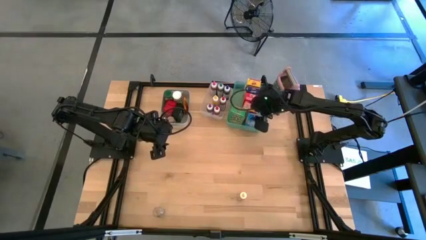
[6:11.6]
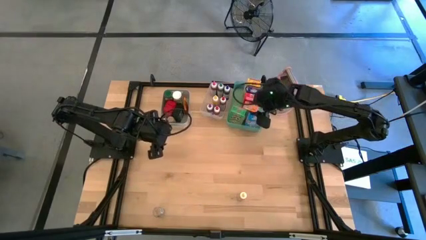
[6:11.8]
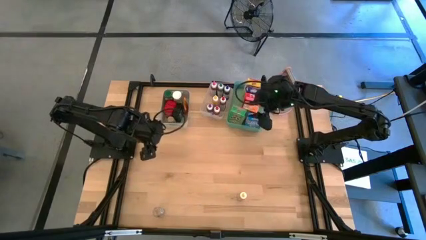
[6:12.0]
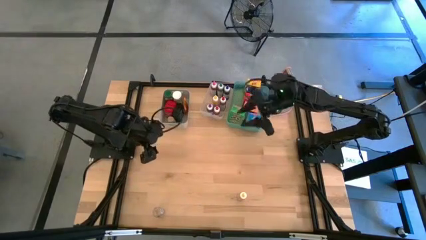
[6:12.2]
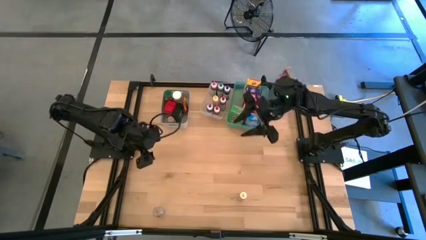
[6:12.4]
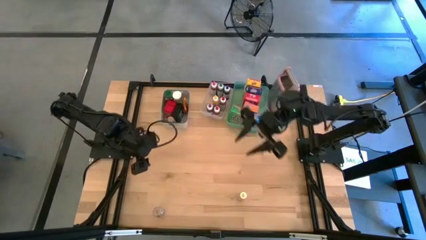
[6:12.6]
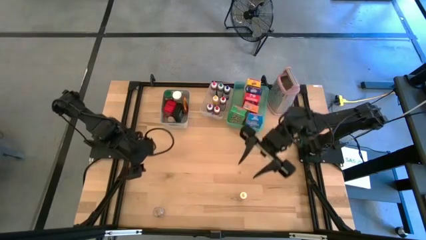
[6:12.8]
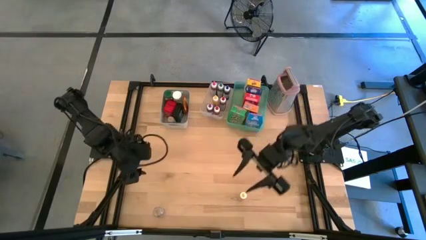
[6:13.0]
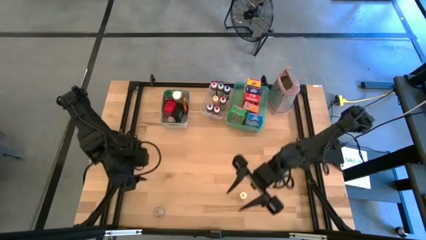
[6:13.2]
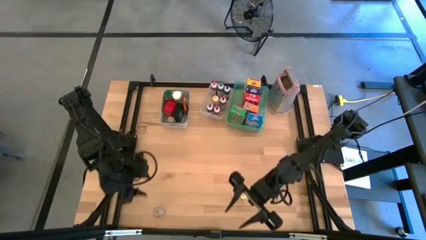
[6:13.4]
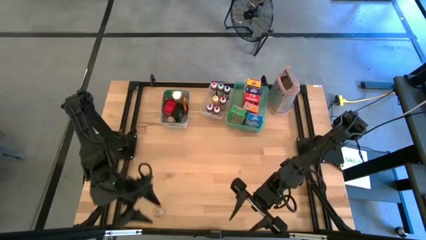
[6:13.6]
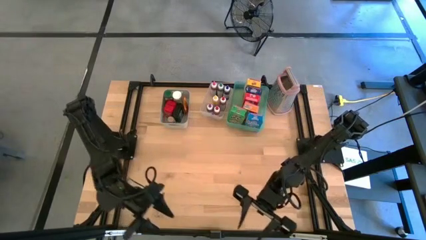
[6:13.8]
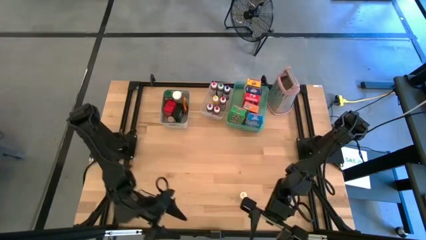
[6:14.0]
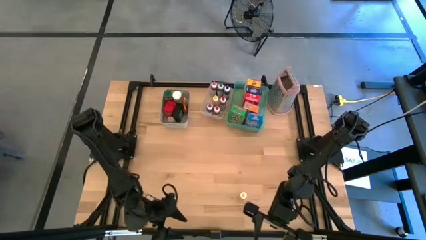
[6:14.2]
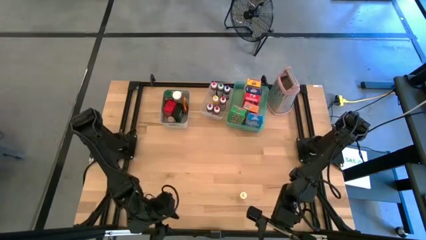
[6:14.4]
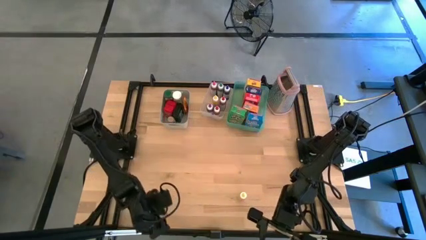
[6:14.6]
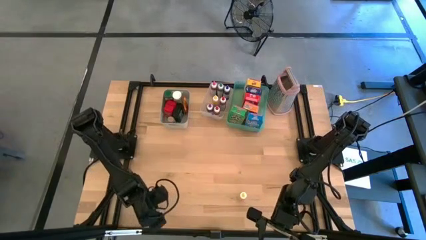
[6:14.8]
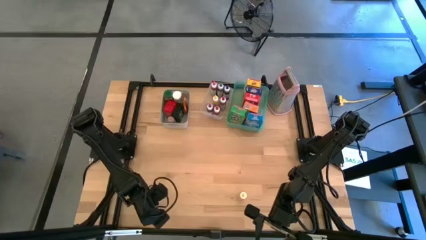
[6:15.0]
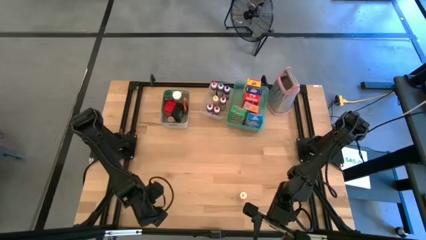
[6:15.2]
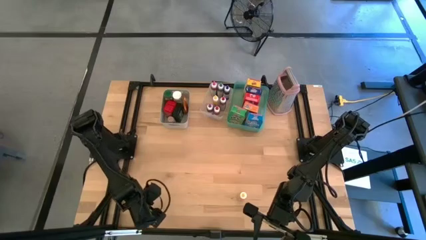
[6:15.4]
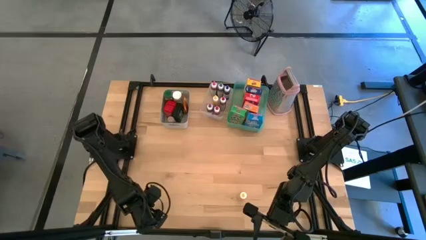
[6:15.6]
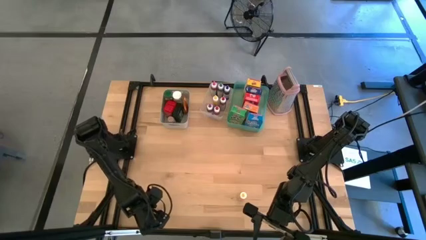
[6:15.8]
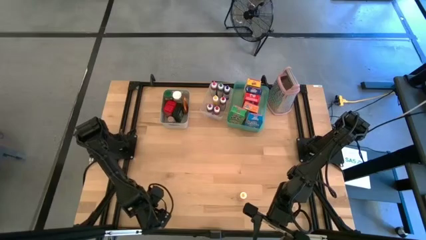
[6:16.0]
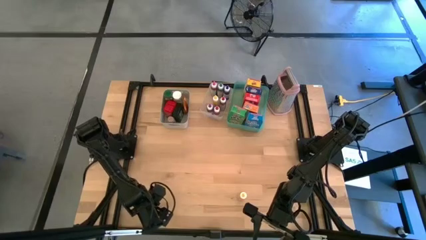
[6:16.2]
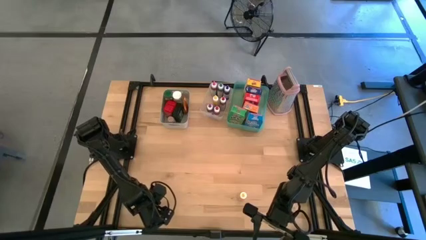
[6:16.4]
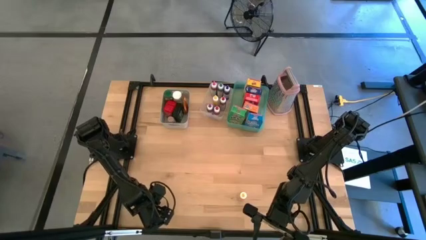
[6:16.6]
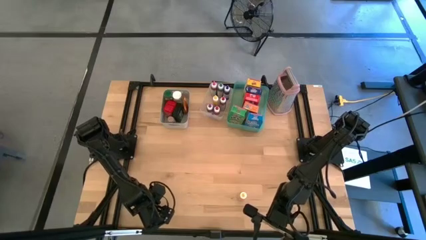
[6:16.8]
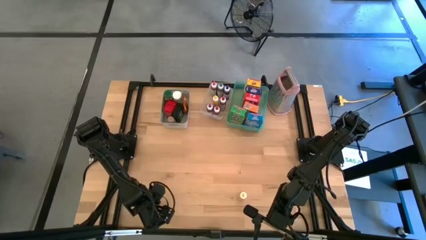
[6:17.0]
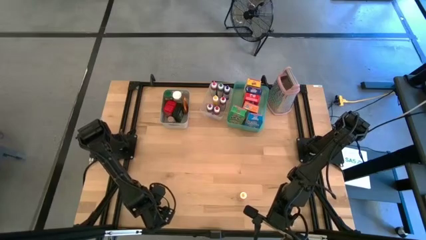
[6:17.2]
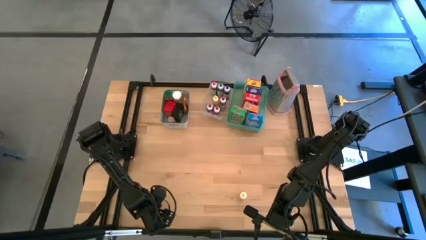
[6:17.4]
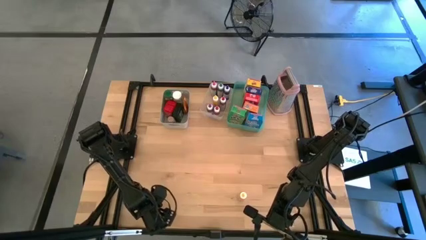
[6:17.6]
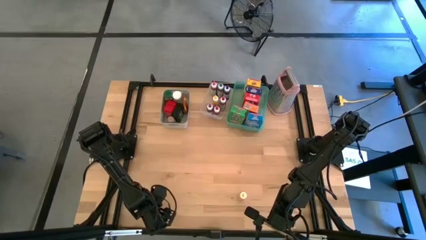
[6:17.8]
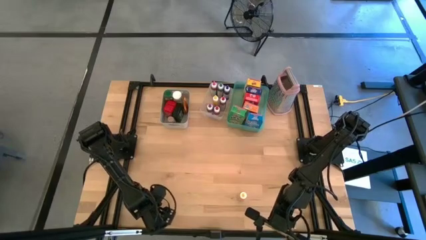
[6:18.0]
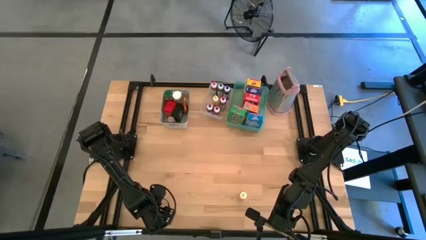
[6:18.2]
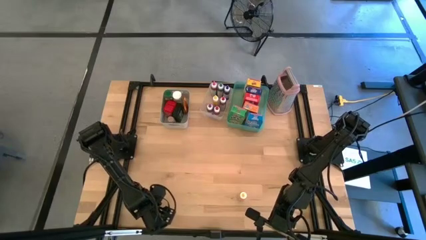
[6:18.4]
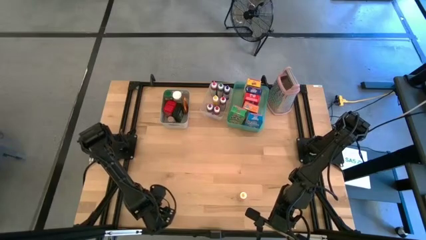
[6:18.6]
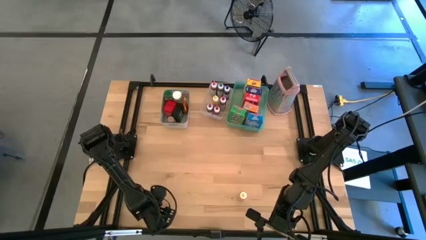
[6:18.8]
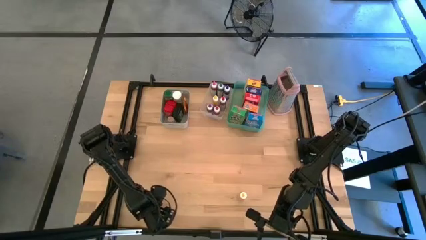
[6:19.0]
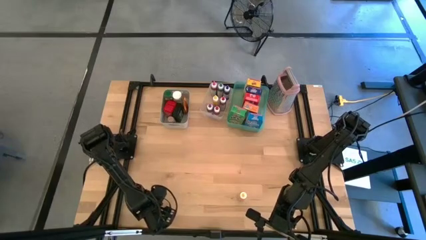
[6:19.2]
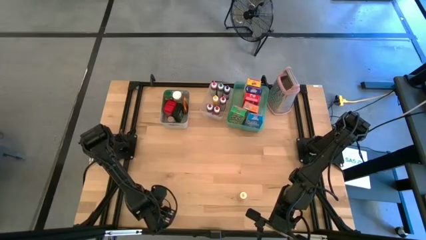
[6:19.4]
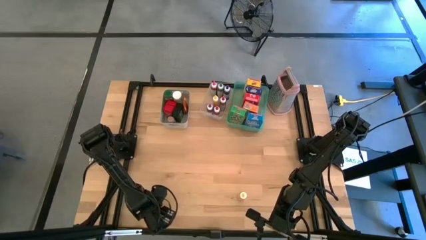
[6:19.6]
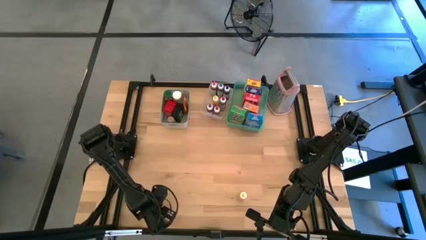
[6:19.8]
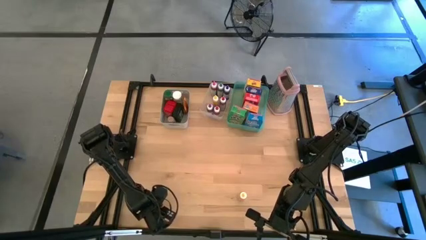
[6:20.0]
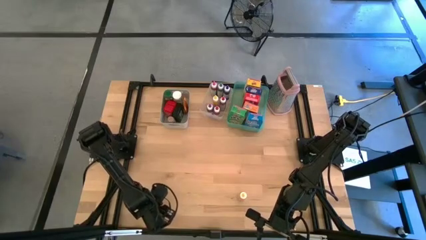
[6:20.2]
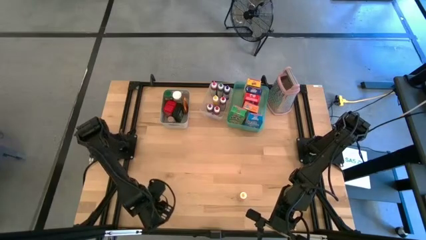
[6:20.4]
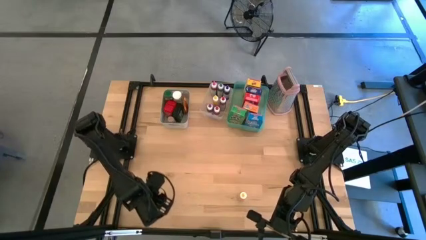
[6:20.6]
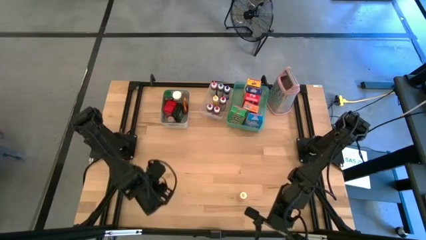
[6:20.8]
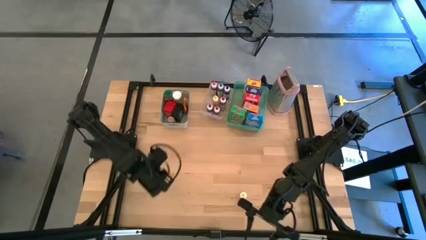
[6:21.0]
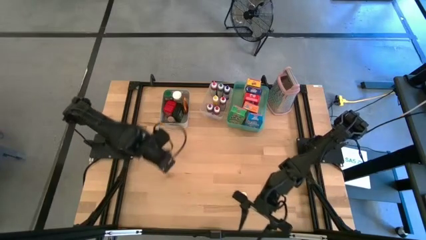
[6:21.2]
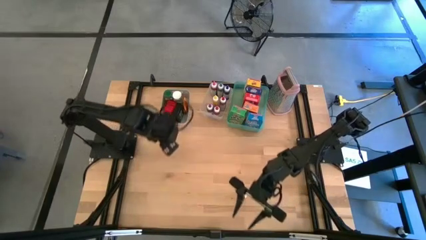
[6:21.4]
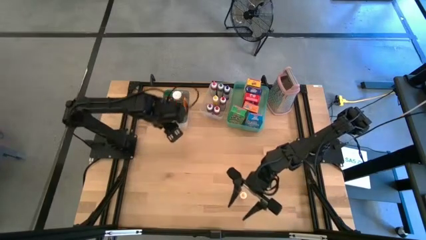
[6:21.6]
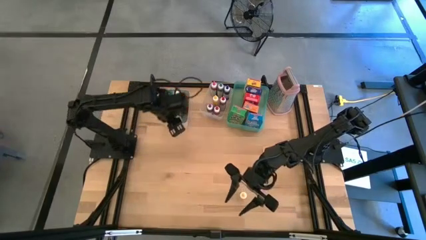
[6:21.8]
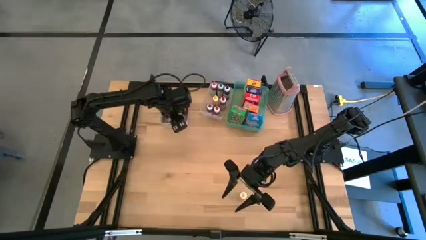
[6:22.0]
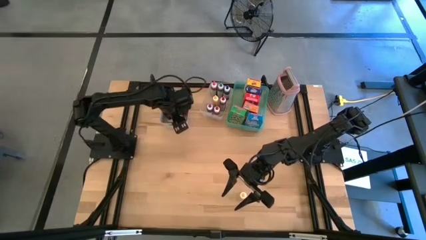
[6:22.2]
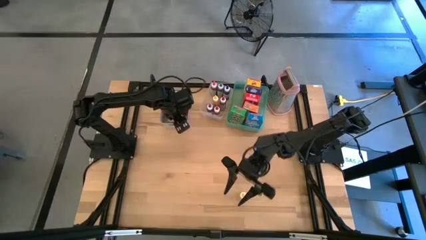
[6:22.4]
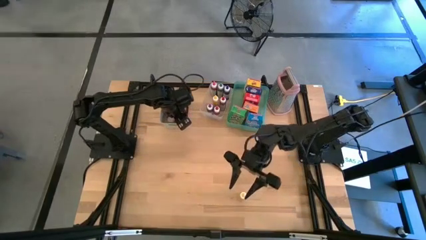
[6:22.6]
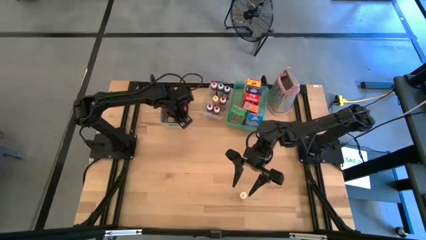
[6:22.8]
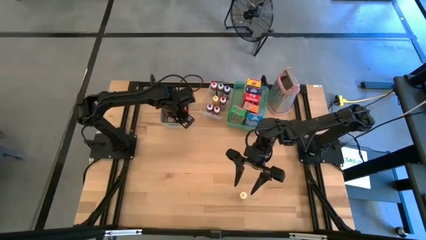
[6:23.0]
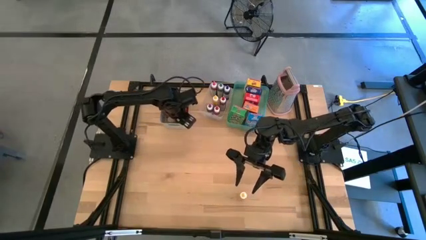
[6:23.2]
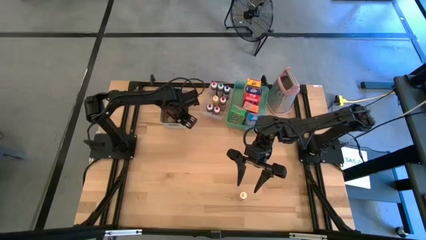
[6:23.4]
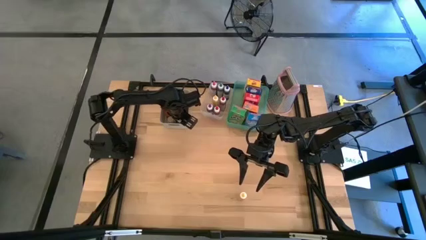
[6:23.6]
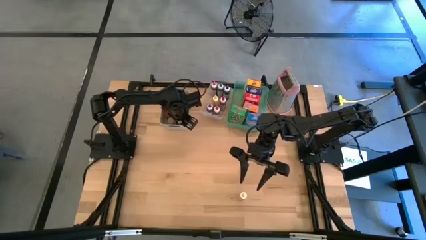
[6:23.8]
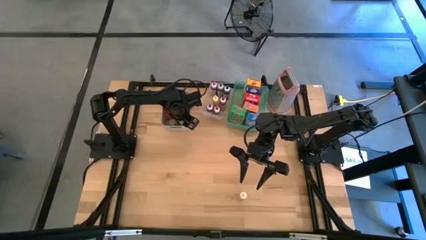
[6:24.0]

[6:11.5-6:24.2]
Task: Pick & Place Kitchen Items
Put the brown seasoning bottle into the gray bin
